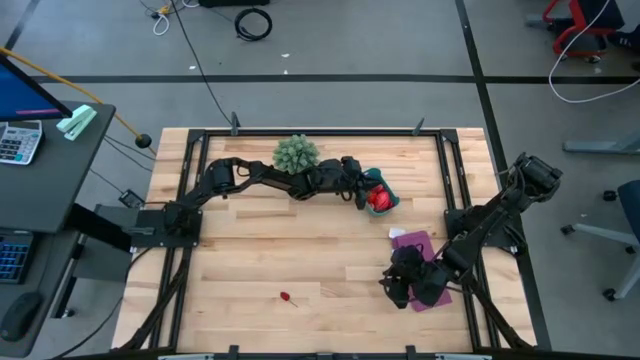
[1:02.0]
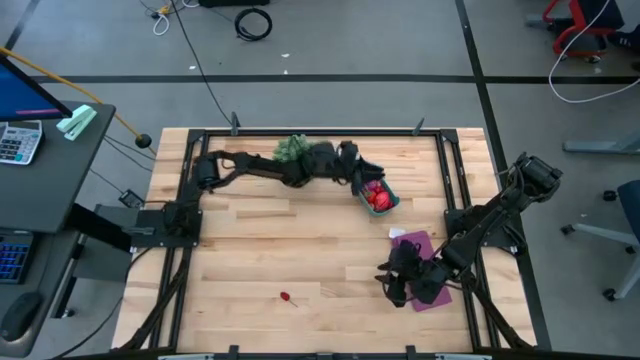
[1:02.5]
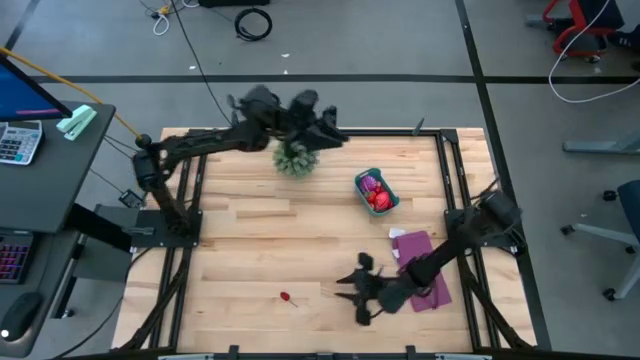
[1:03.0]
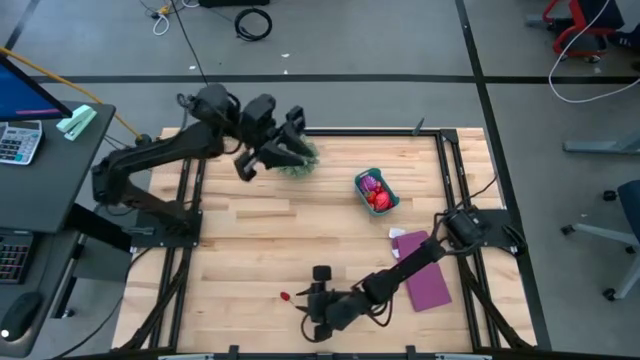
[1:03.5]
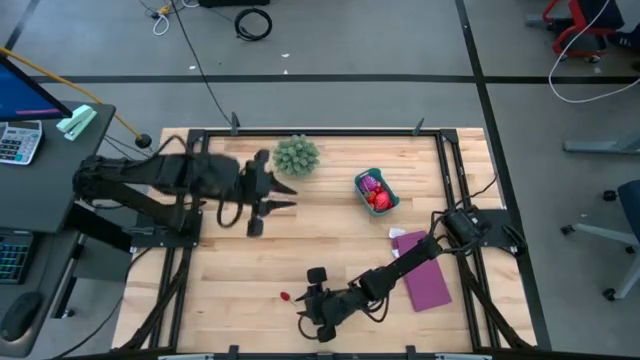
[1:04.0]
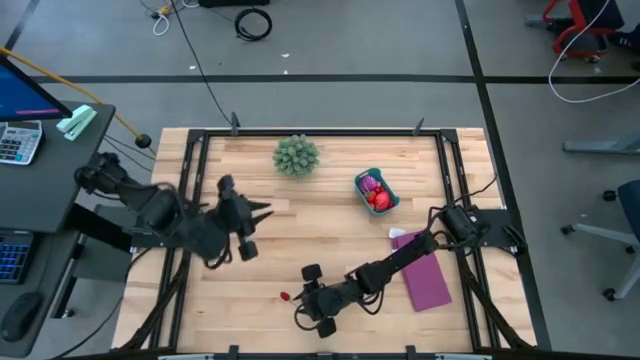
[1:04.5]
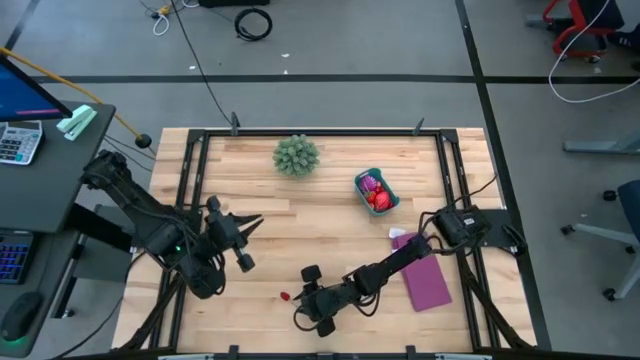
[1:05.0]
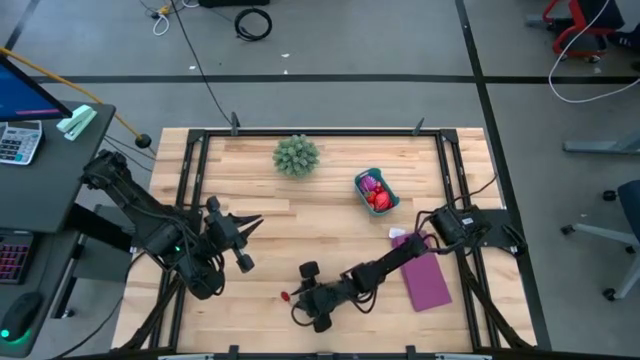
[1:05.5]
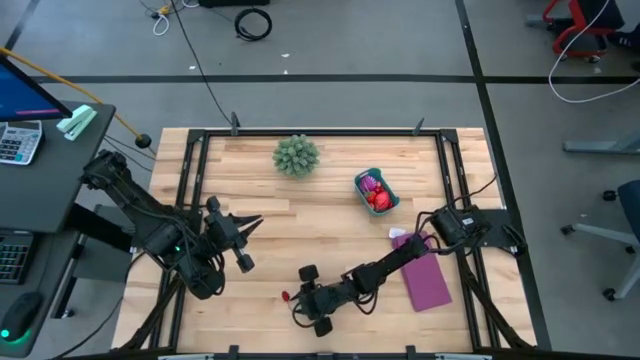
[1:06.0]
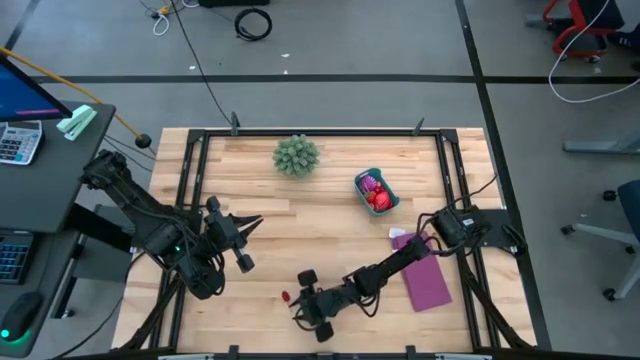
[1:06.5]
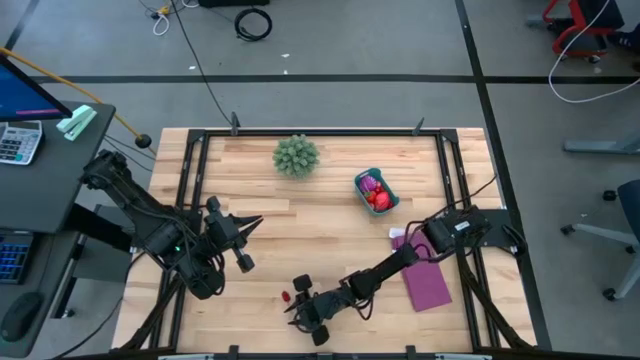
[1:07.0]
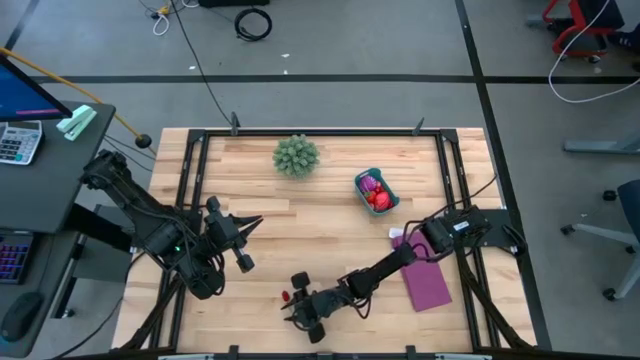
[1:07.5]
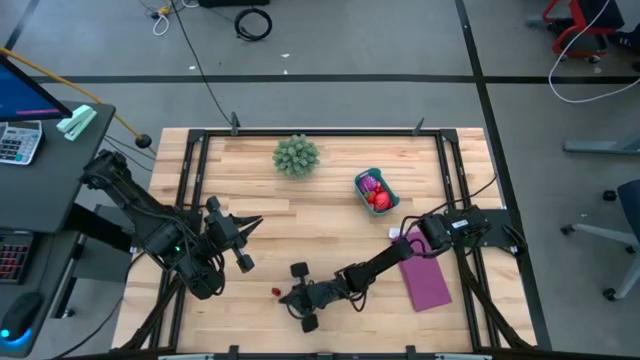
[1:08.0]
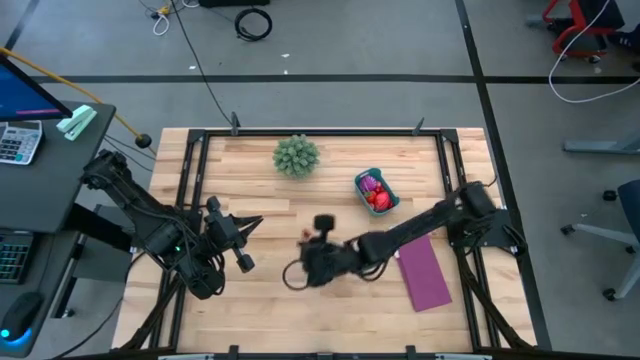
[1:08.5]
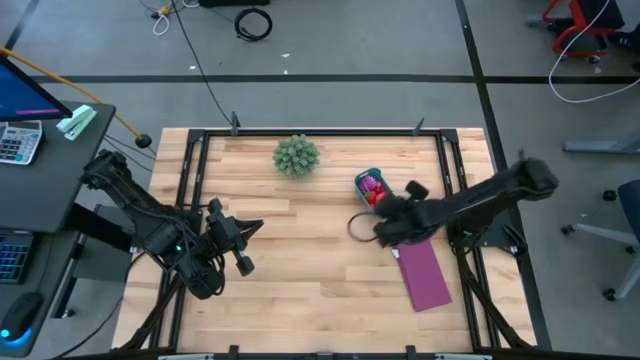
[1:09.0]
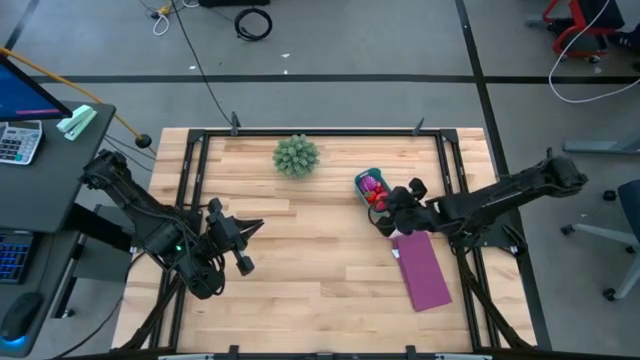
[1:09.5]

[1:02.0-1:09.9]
Task: Pick and placing Produce into tupperware
Put the red cherry into the blue bin

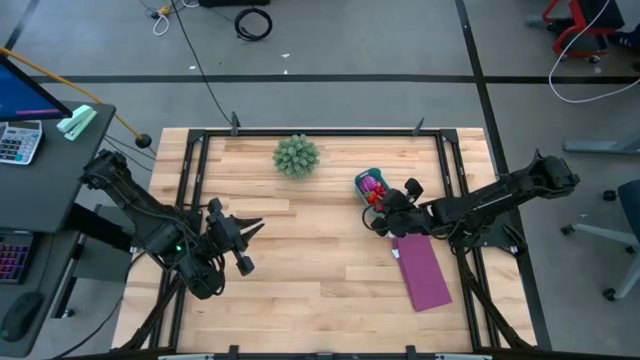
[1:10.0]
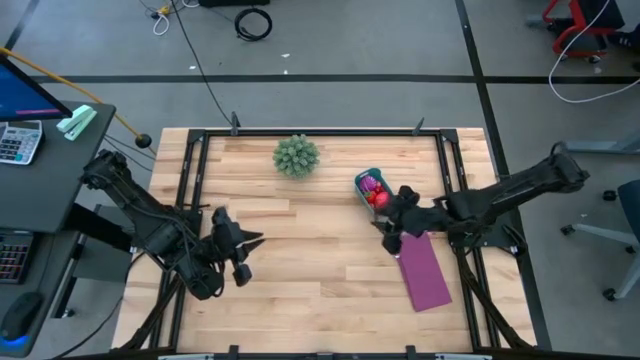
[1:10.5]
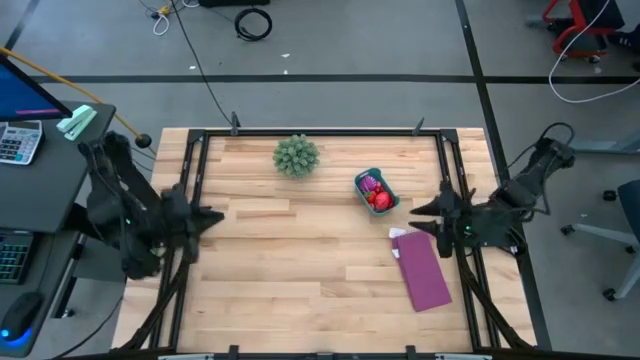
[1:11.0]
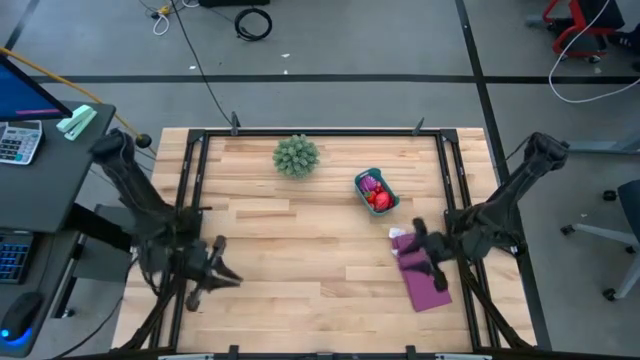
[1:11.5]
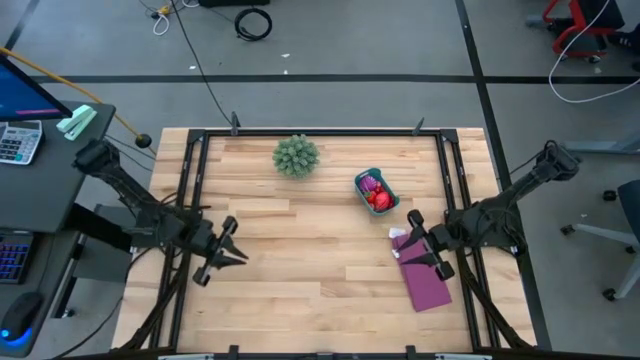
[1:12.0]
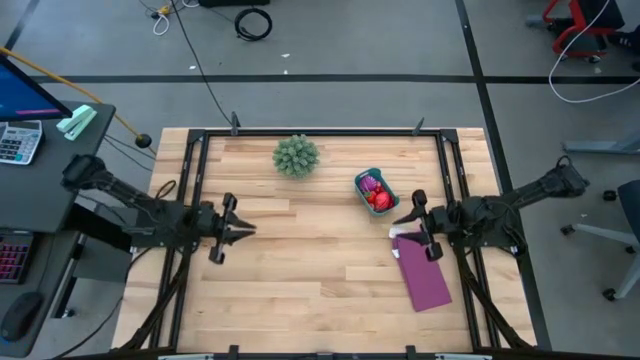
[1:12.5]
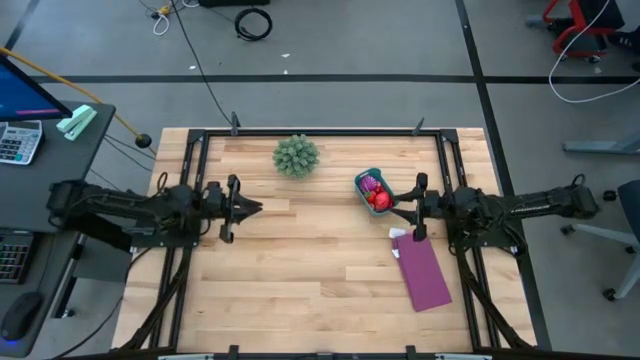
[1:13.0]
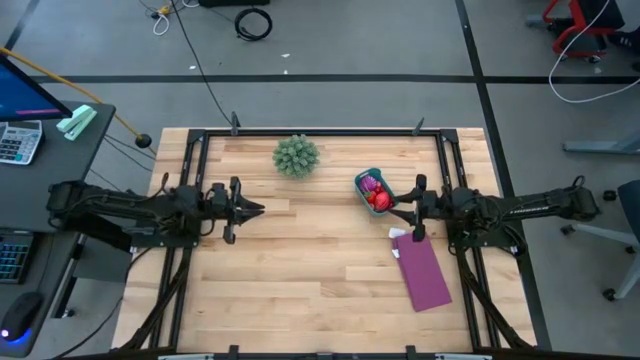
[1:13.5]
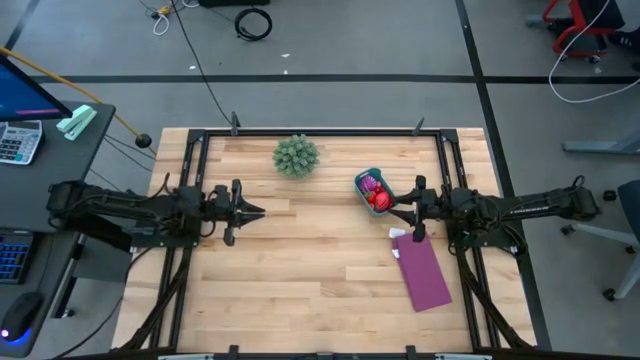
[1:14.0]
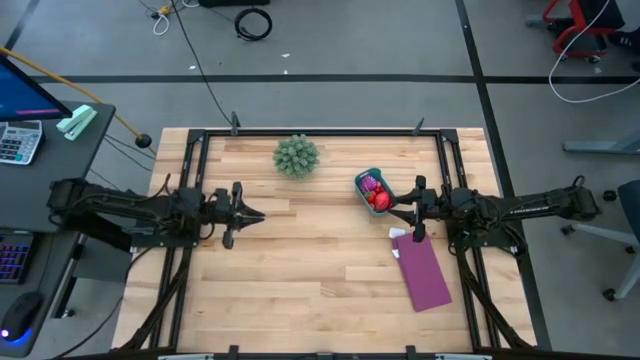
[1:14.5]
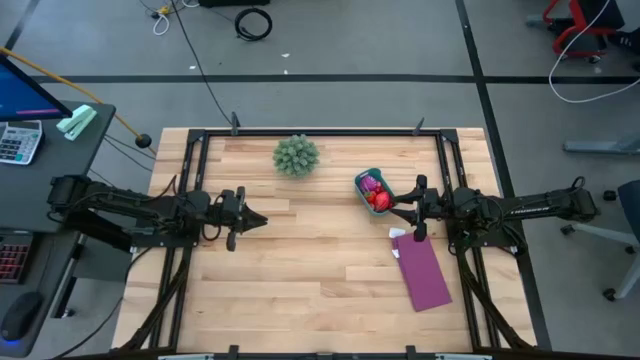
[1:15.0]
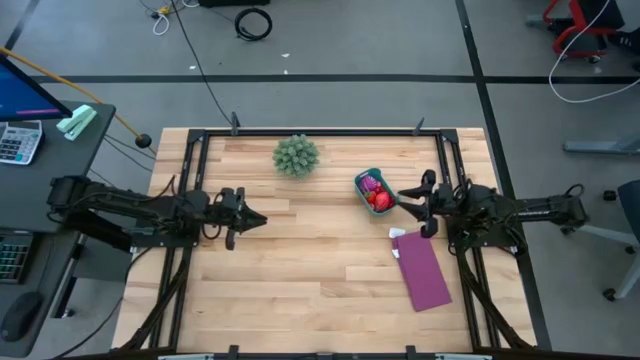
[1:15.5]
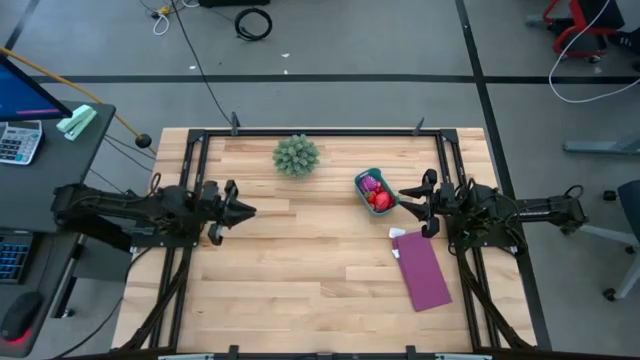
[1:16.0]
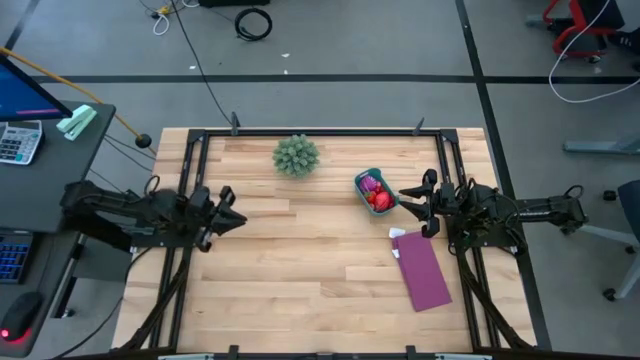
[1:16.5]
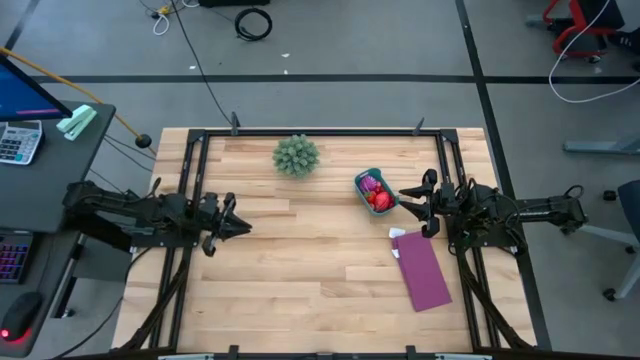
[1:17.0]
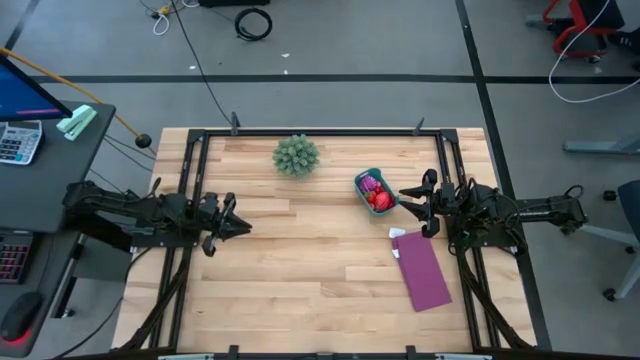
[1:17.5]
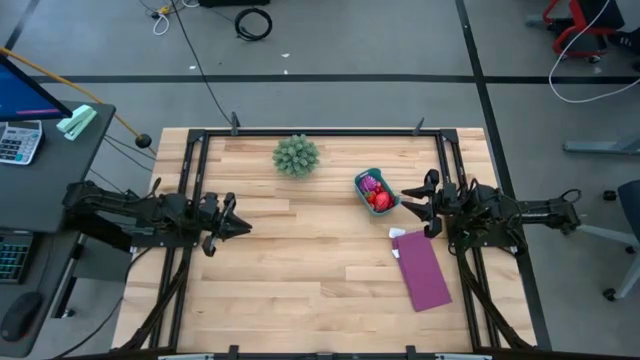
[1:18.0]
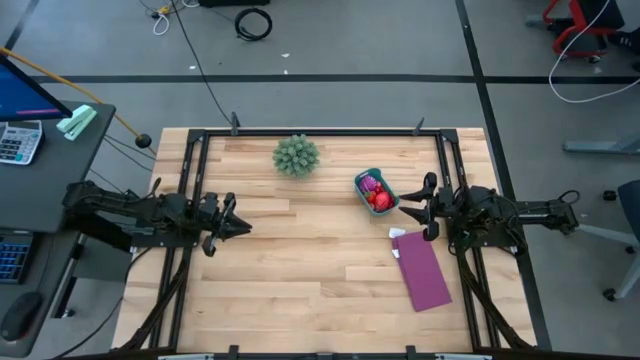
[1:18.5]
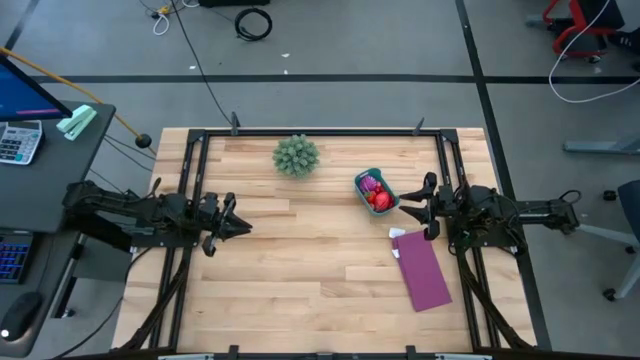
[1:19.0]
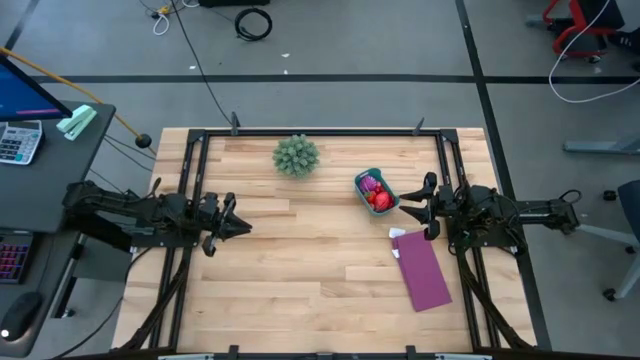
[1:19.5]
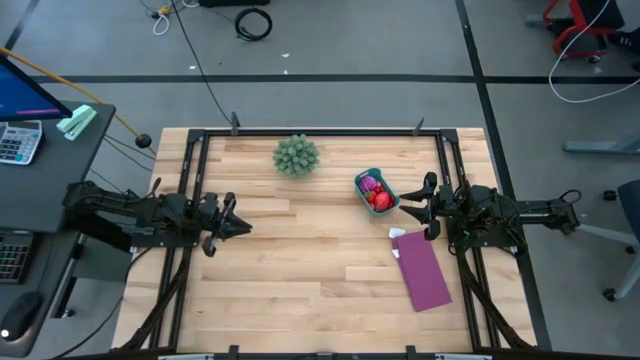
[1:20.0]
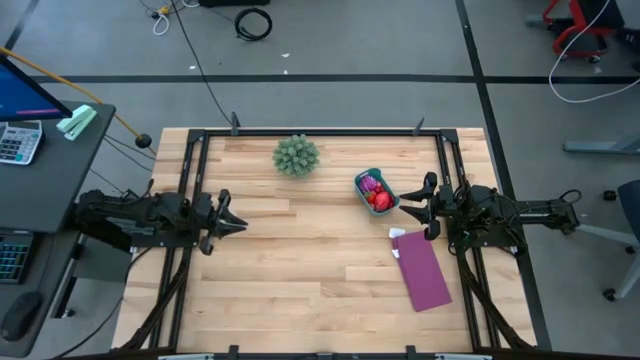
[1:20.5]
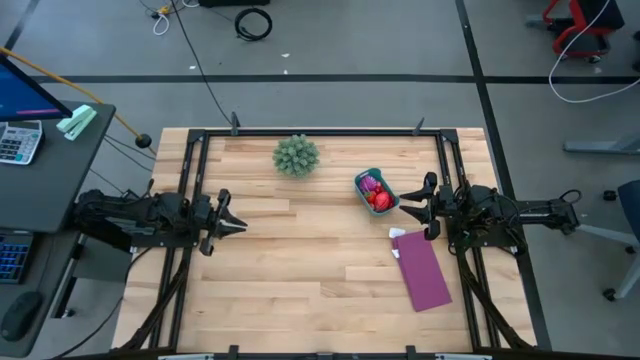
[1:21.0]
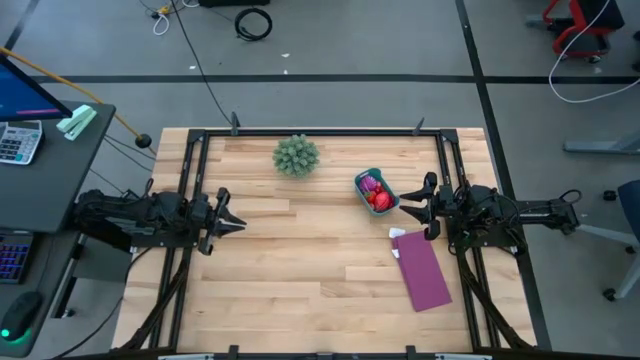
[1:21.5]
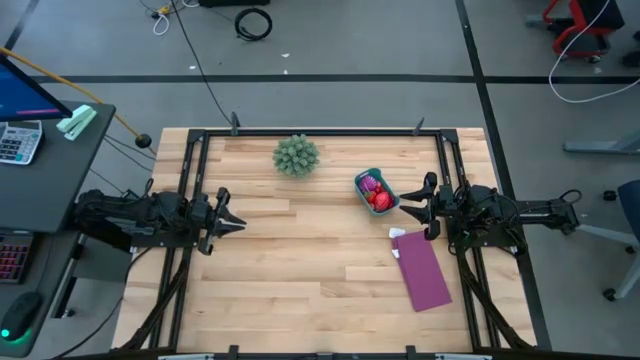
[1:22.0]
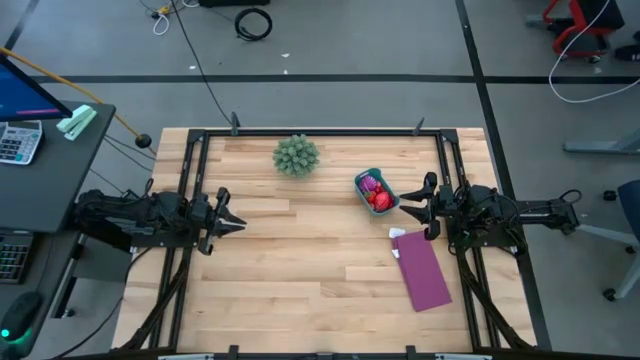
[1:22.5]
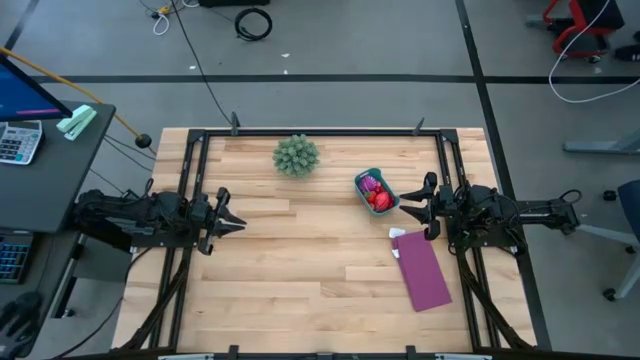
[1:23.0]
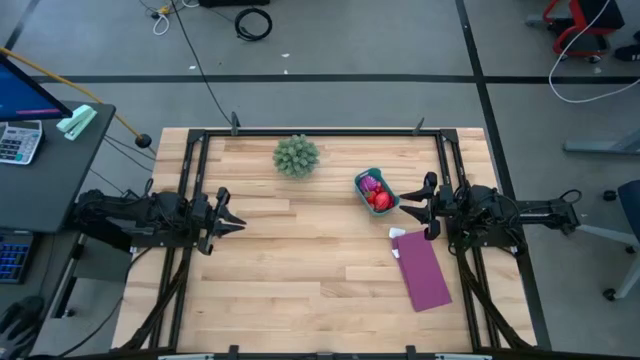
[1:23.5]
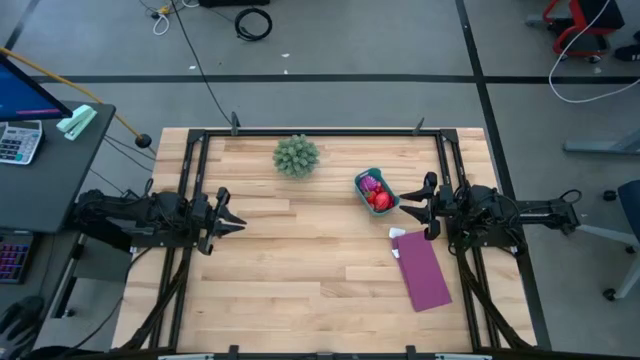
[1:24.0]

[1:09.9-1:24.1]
Return to Home Position
